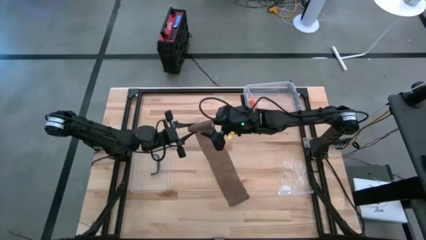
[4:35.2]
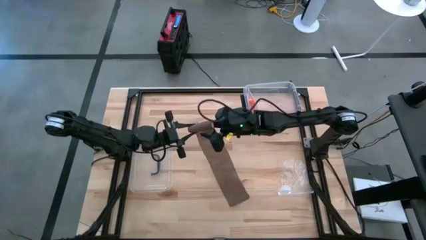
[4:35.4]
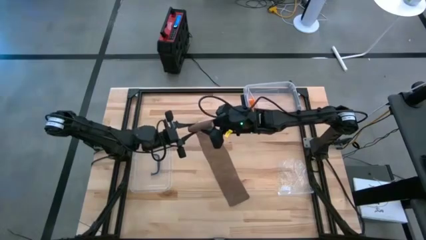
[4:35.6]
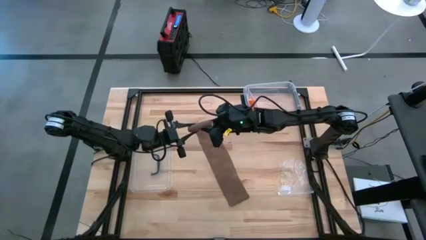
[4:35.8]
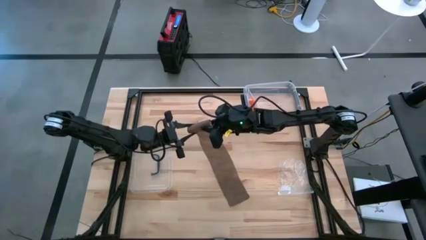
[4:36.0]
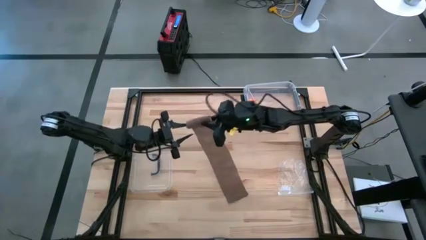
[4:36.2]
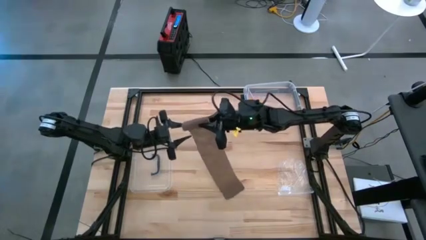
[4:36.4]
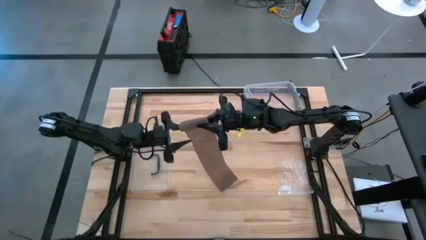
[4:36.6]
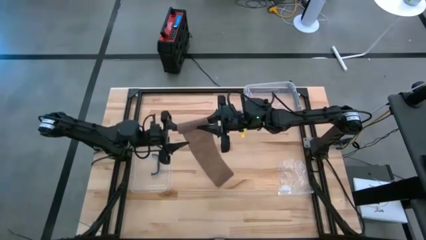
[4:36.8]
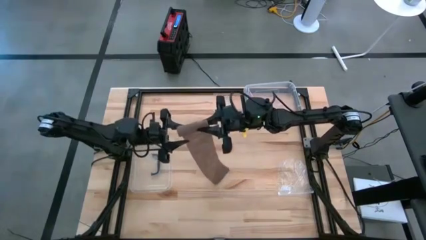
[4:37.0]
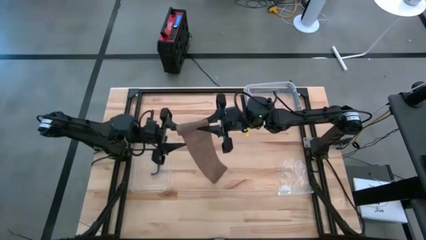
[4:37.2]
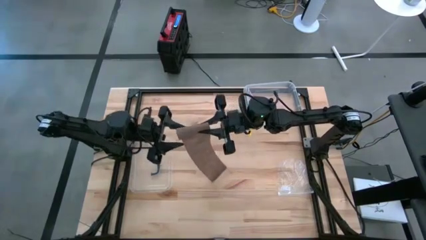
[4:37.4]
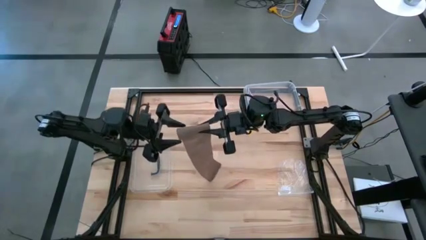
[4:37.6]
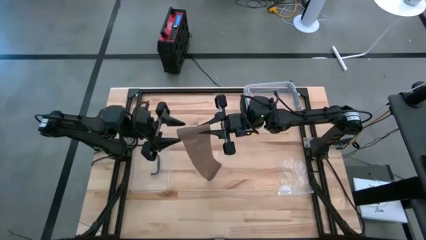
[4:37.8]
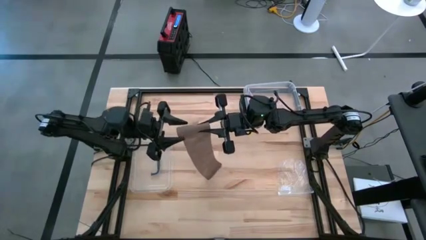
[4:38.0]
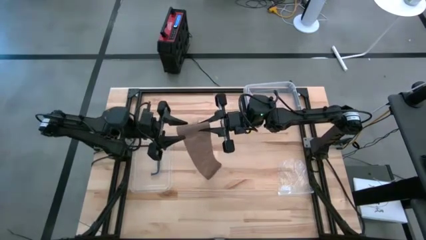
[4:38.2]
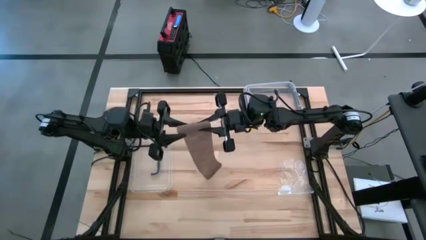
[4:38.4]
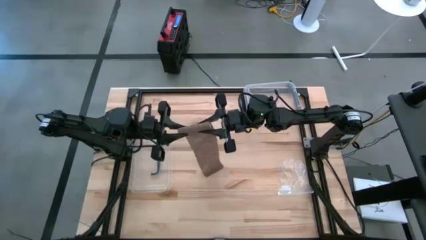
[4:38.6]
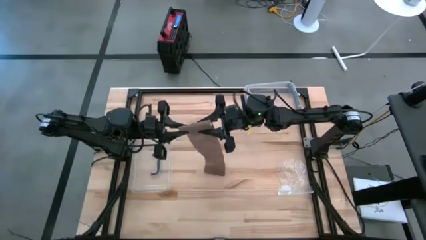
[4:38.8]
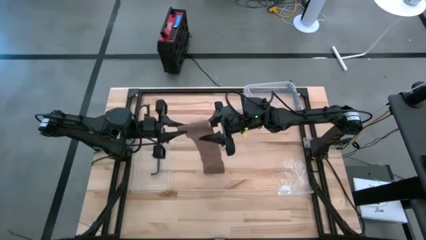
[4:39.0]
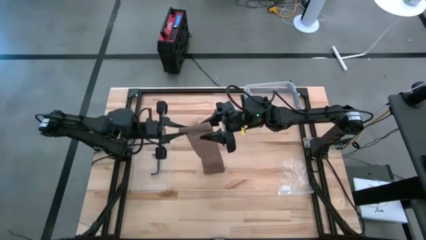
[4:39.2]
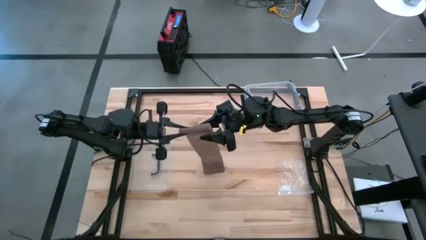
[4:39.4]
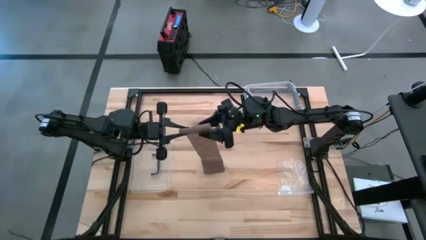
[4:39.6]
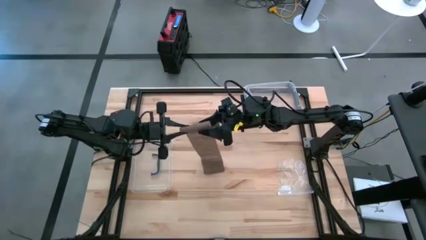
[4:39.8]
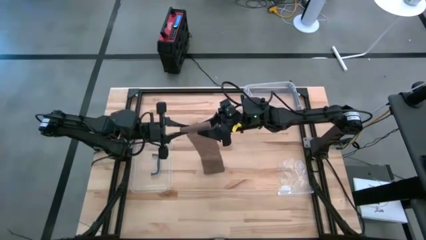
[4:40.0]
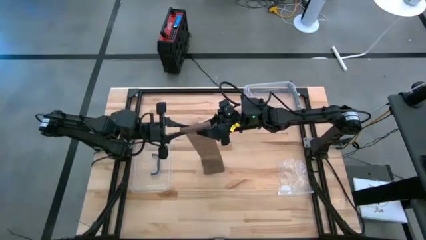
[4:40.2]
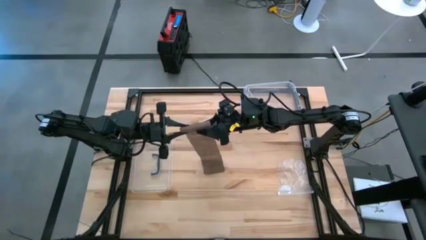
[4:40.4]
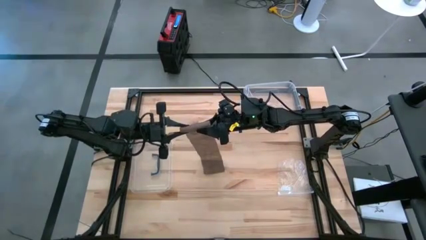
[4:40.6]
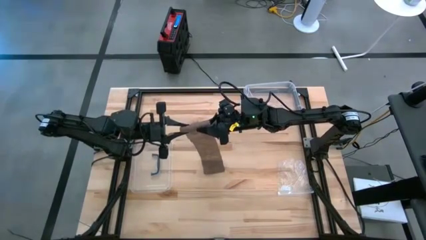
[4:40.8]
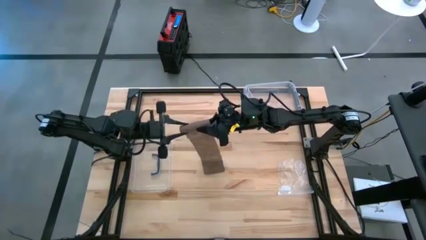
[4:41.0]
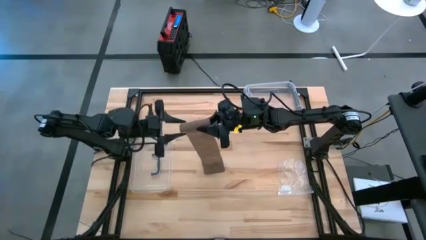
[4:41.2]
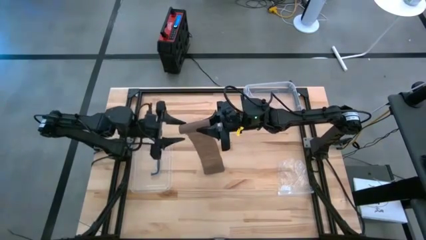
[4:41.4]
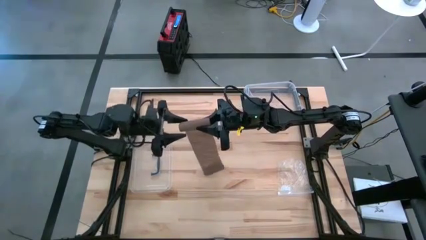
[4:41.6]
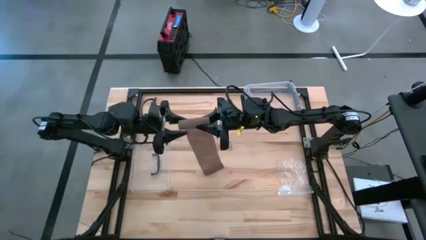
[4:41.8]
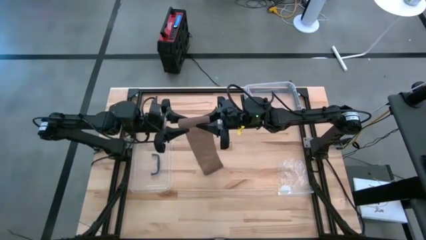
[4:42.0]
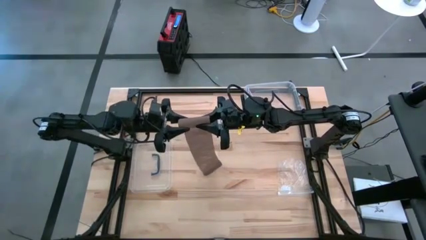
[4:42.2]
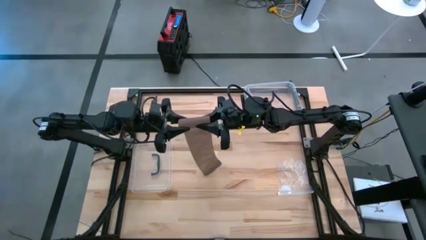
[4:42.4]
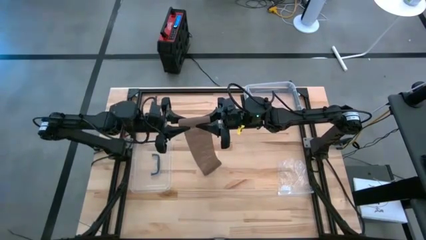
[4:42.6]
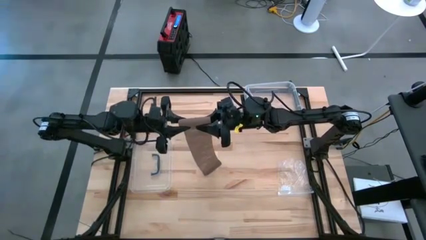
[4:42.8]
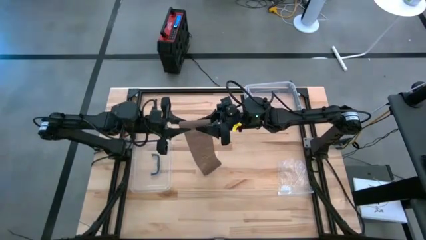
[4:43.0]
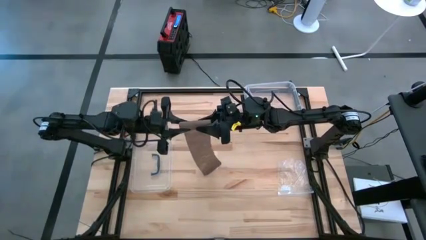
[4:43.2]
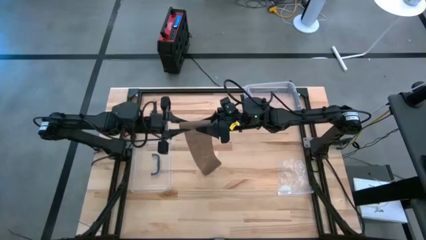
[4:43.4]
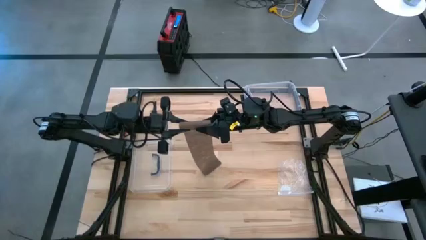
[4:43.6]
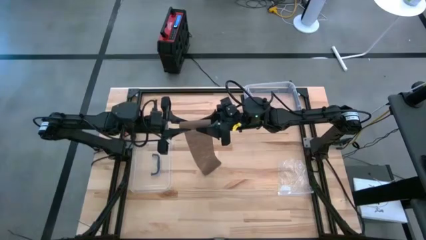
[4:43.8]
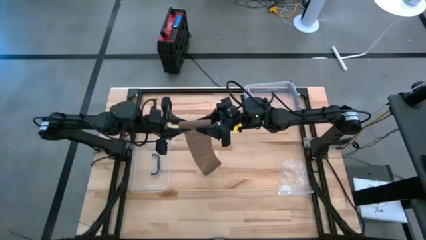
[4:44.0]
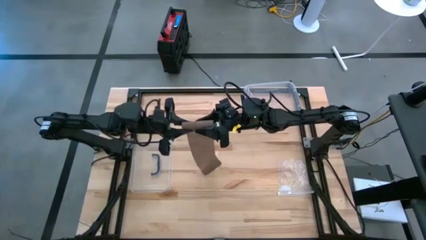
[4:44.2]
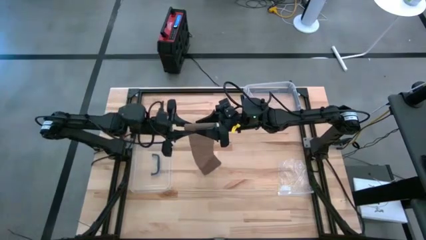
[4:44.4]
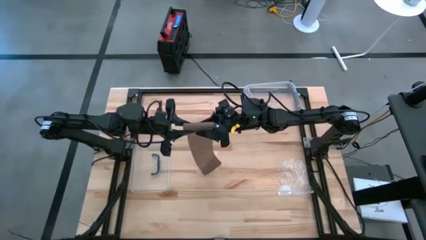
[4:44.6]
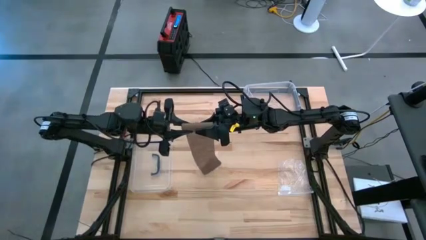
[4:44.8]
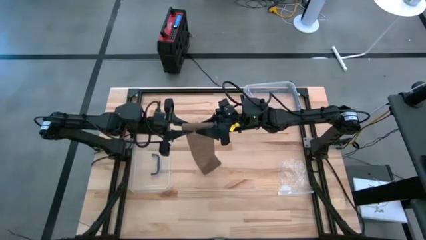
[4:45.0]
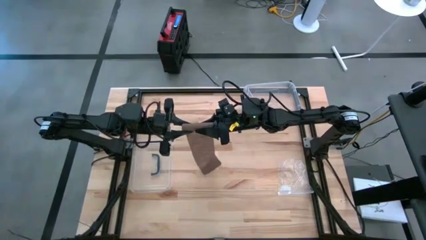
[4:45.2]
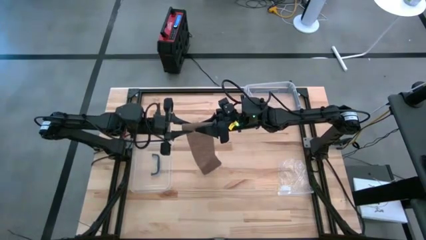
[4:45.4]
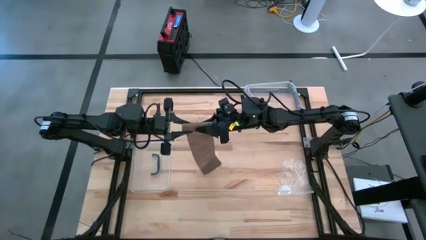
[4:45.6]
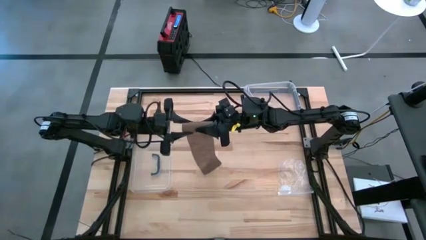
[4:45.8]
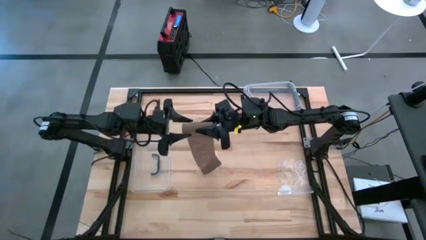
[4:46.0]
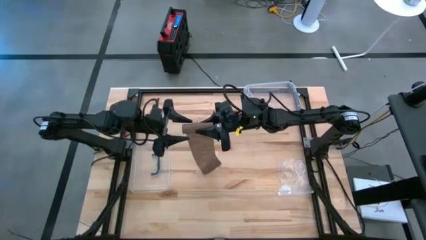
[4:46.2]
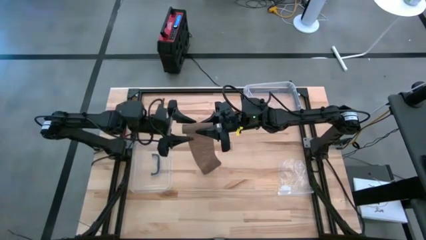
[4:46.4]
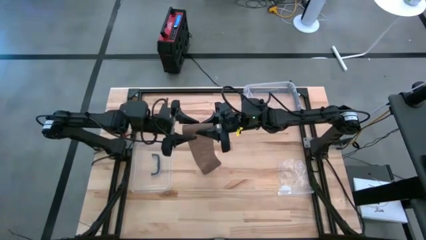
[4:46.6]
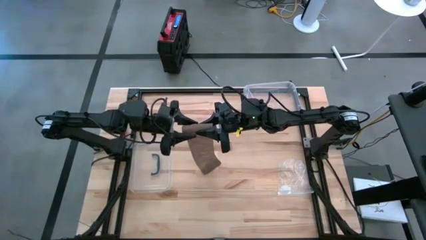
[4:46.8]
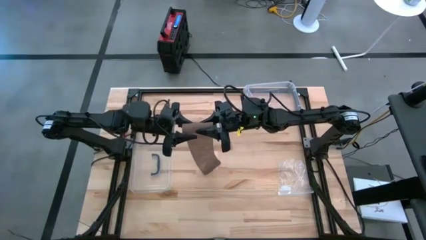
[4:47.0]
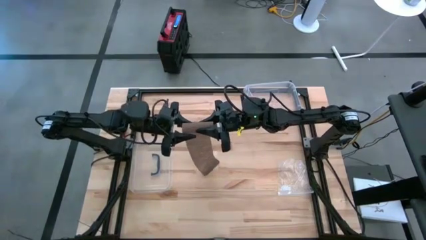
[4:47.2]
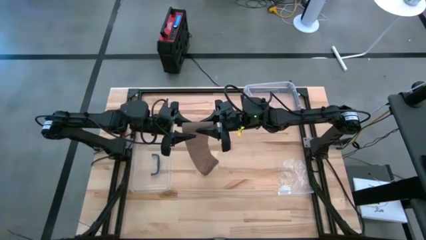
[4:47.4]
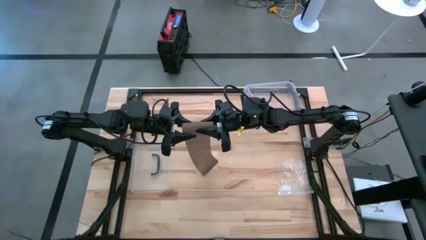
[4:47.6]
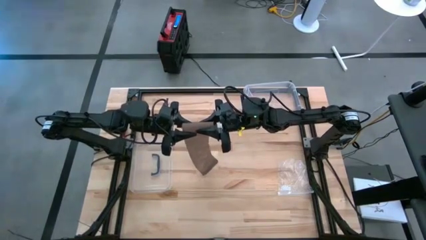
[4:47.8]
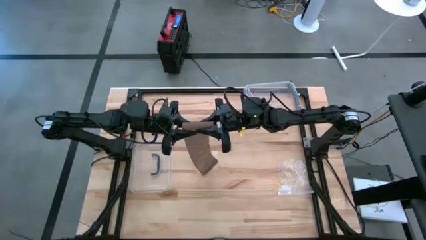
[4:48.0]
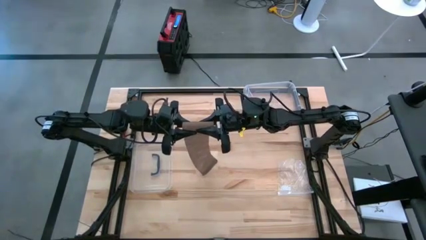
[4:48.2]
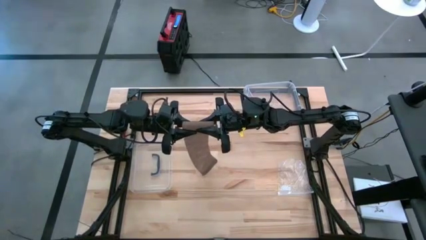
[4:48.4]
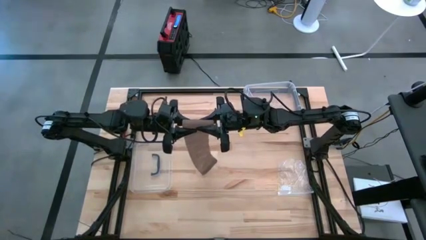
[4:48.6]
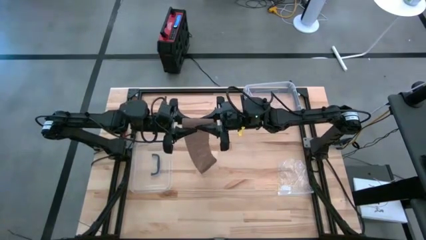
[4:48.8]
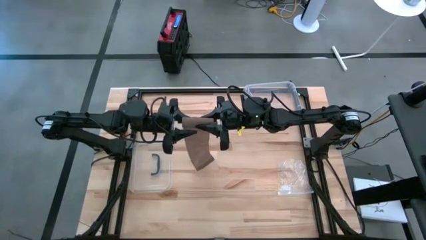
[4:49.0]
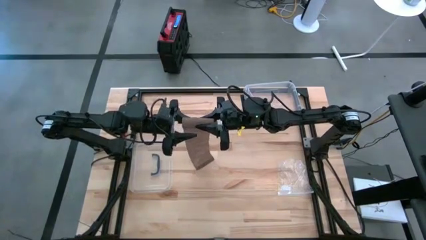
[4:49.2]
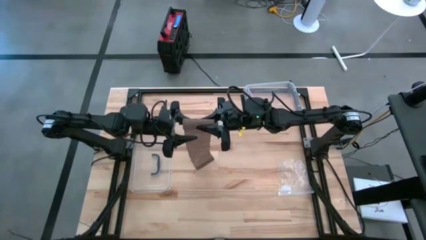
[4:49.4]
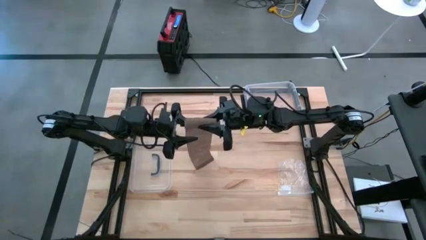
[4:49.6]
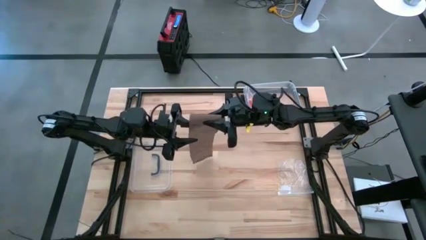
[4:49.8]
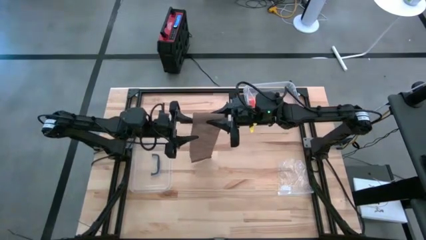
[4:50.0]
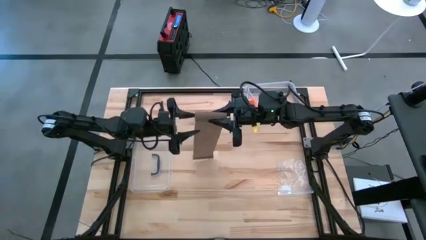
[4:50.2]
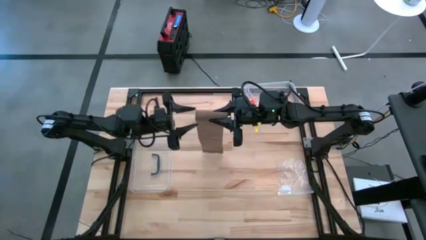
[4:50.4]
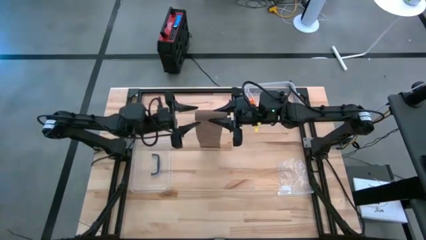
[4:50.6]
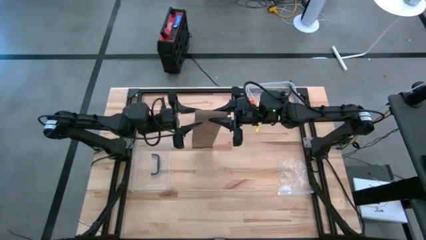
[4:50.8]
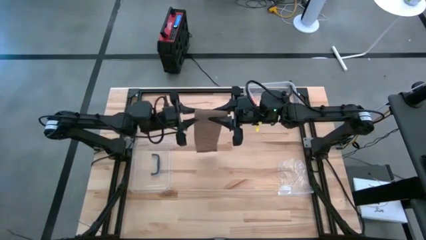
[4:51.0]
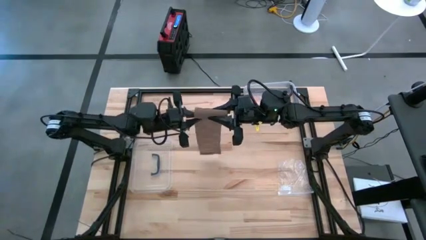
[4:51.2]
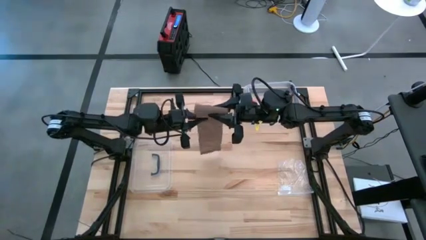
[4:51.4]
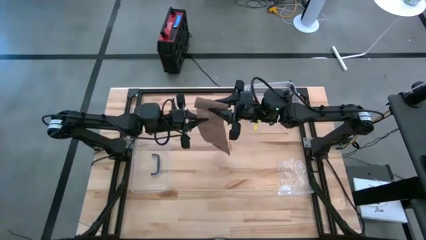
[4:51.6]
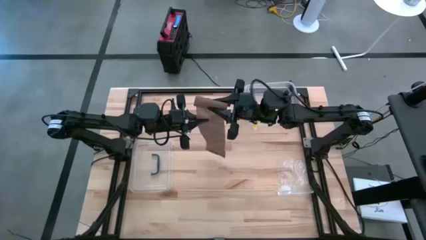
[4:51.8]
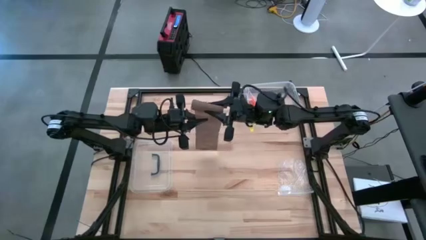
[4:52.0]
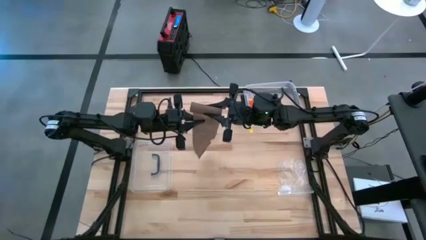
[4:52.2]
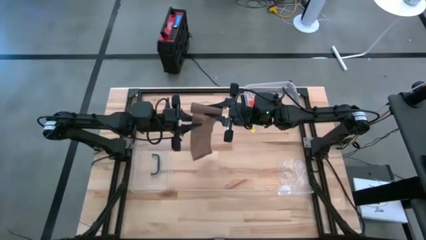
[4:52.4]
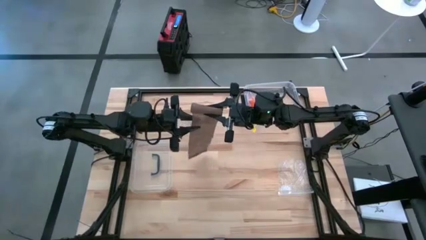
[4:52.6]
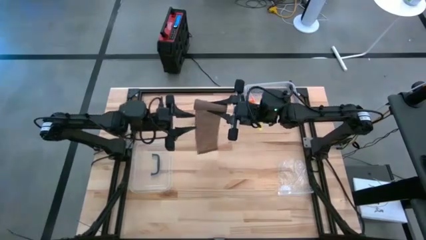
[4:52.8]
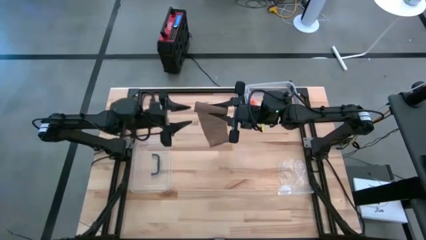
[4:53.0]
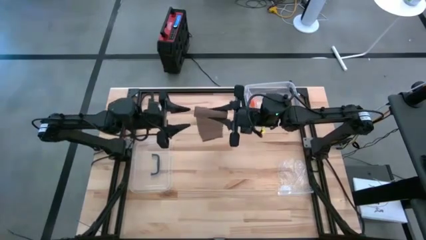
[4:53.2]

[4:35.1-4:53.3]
Task: Roll bandage
Roll the brown bandage
